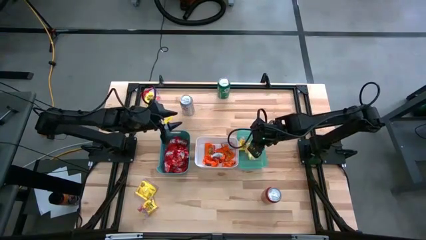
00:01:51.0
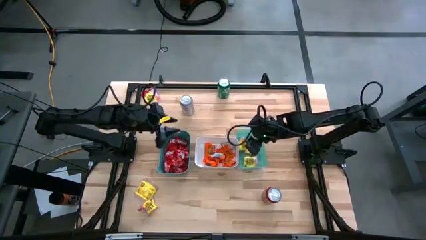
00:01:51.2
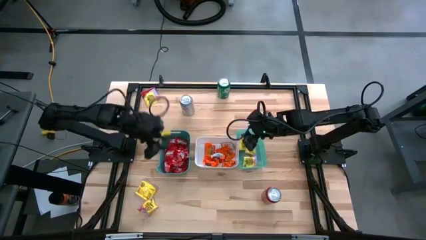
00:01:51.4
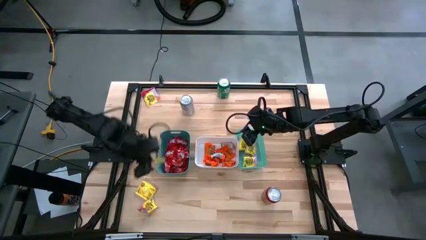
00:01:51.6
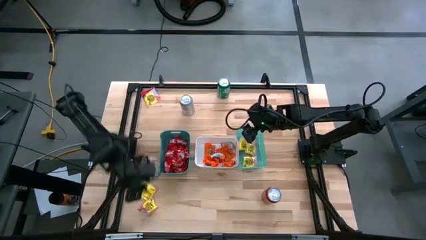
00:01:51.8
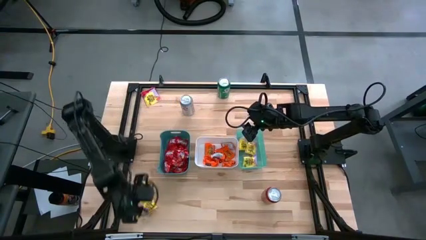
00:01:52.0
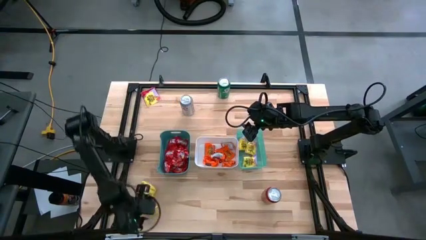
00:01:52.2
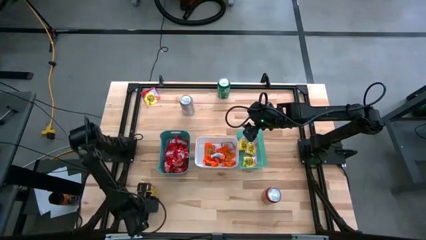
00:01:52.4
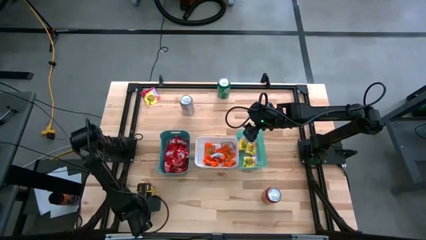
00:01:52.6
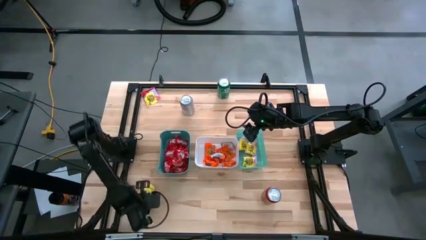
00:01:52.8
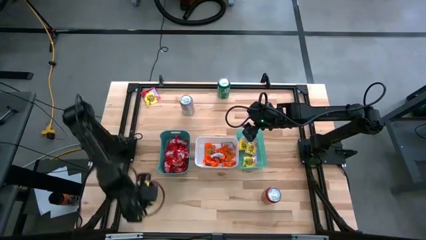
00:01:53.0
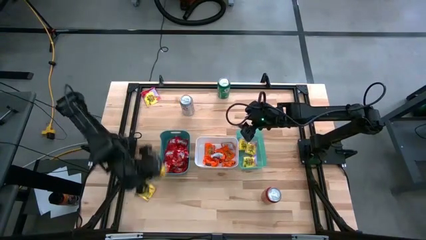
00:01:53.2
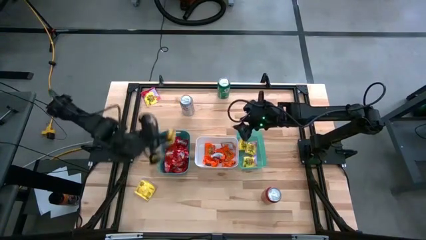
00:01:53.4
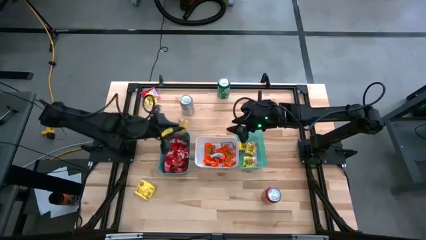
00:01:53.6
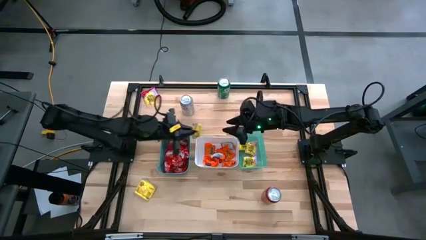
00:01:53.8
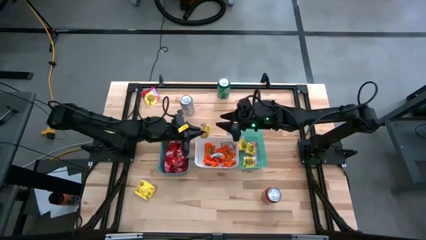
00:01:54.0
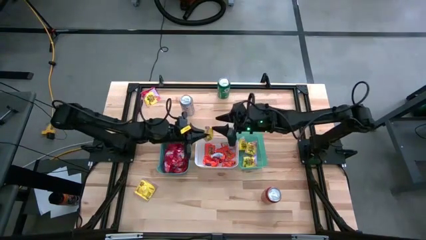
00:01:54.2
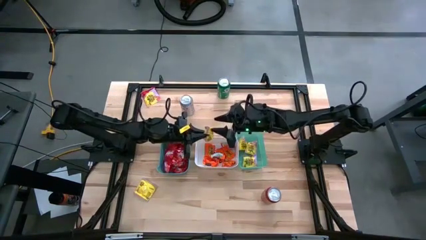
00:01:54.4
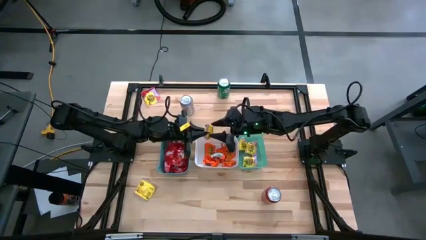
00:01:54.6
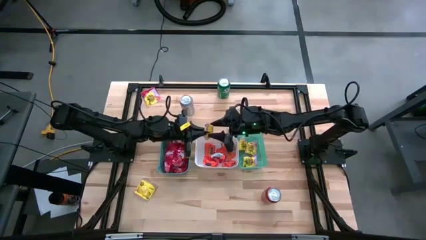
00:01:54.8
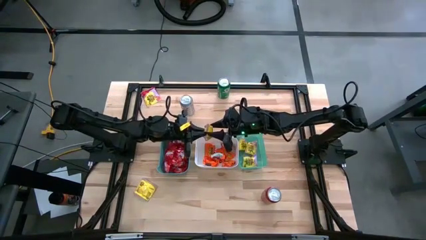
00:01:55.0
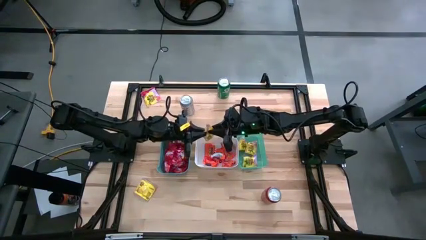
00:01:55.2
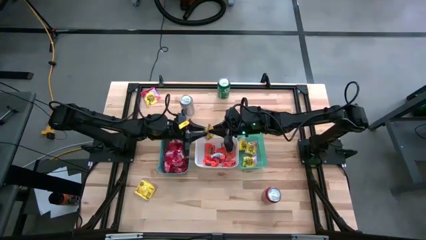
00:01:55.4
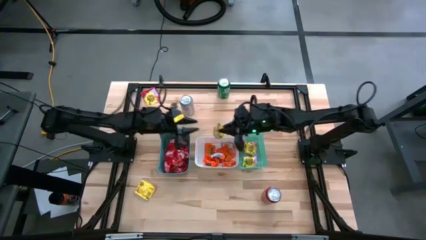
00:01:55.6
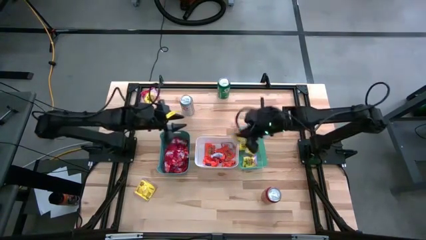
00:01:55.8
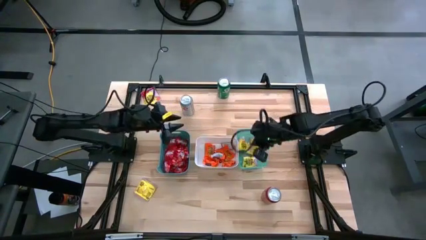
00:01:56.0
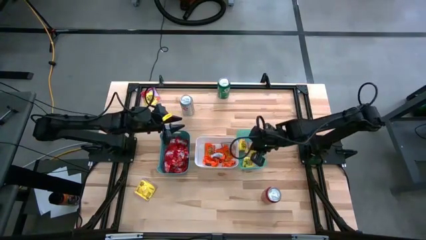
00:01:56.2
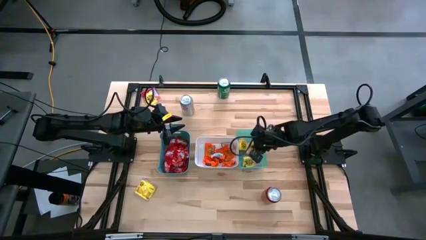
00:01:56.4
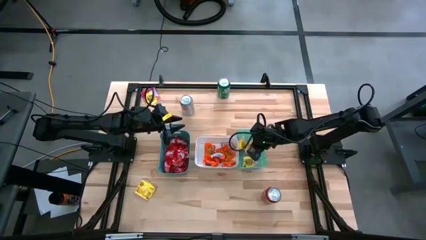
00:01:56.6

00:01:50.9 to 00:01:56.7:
Task: Sort candy
Put the yellow candy into the light green bin

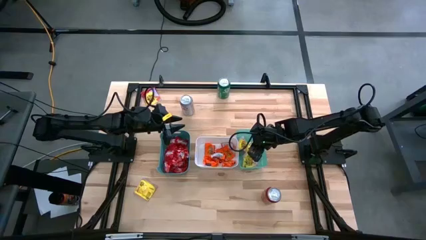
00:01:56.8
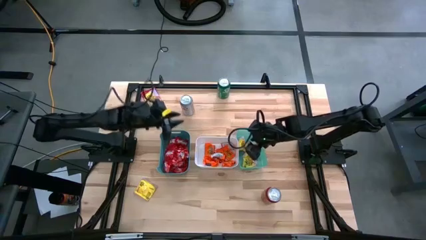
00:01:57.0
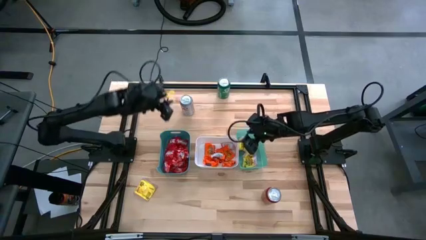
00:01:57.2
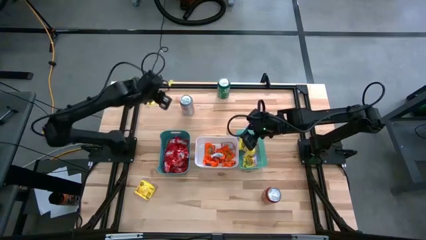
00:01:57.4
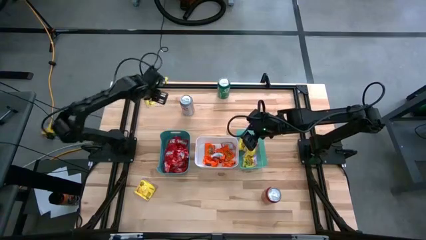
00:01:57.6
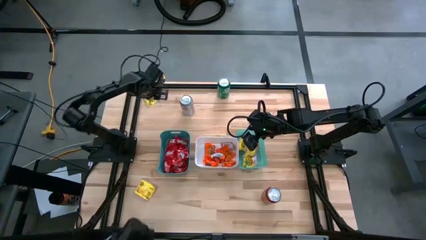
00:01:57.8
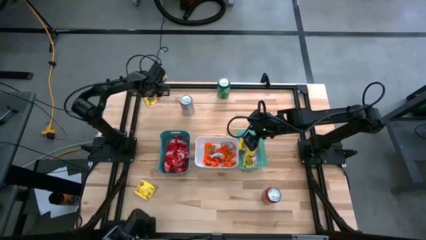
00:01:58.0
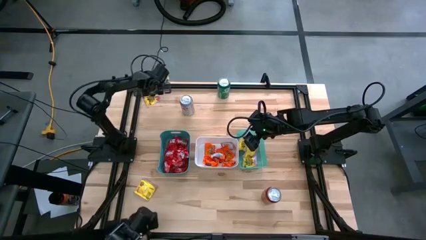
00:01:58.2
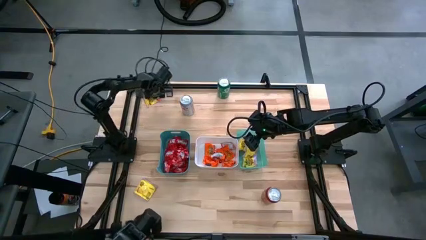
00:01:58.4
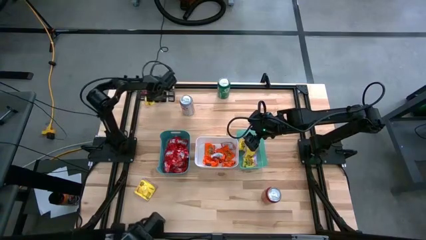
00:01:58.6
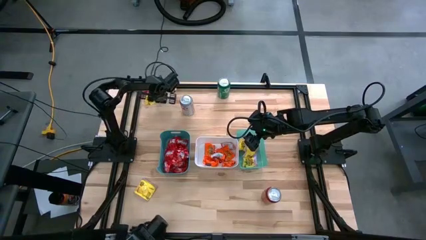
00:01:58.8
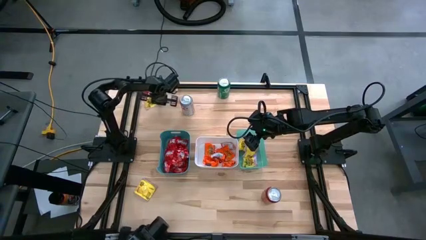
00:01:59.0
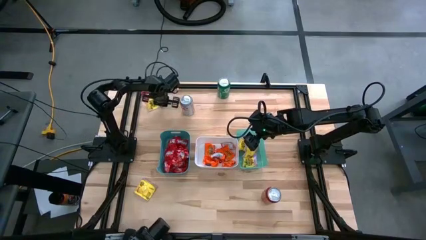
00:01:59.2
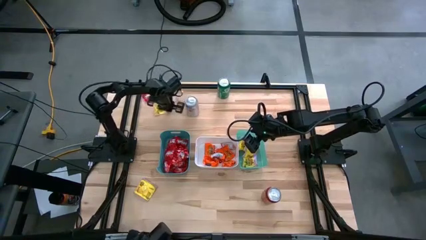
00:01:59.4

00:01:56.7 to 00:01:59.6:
Put the yellow candy into the light green bin

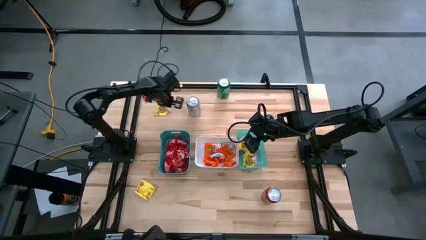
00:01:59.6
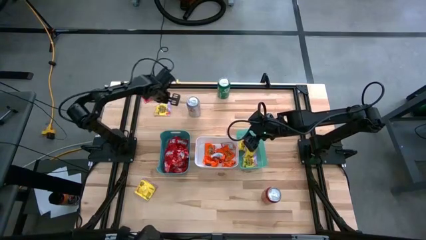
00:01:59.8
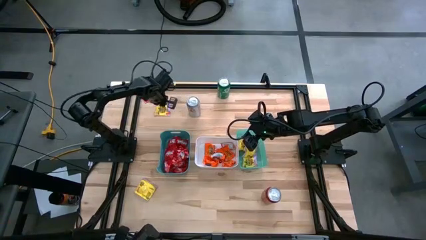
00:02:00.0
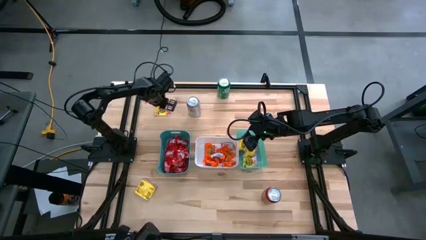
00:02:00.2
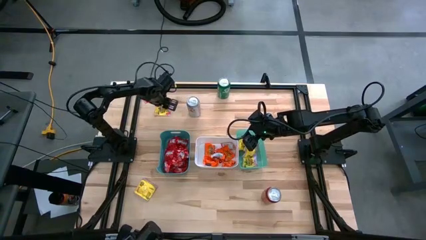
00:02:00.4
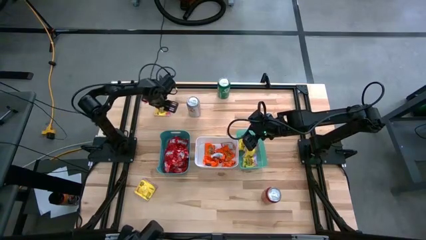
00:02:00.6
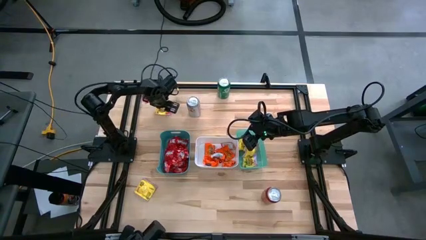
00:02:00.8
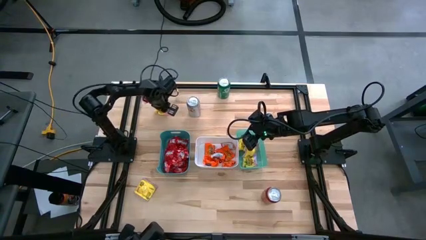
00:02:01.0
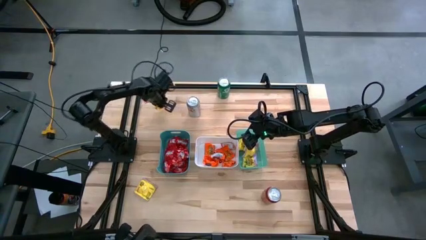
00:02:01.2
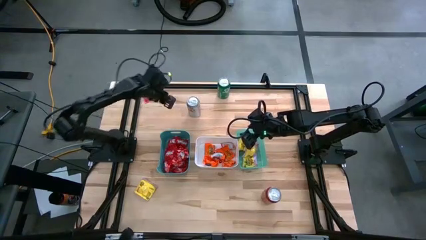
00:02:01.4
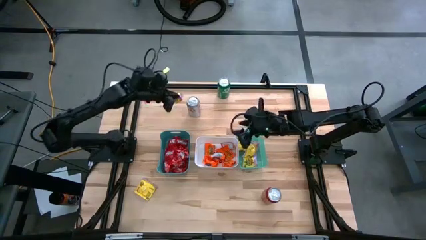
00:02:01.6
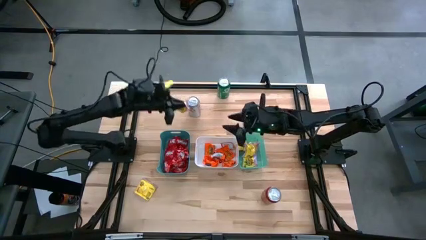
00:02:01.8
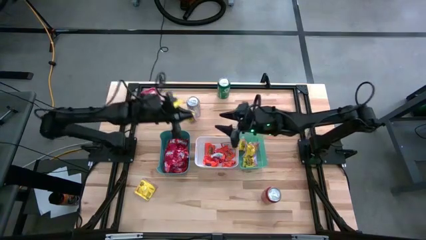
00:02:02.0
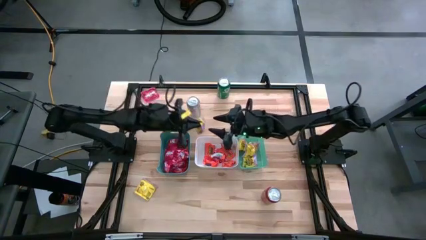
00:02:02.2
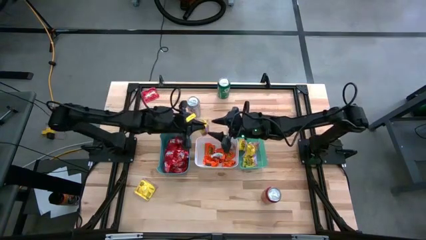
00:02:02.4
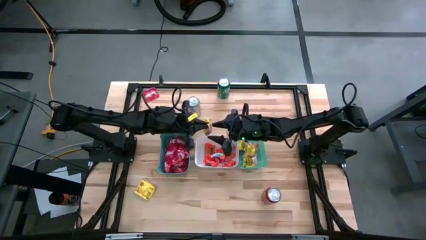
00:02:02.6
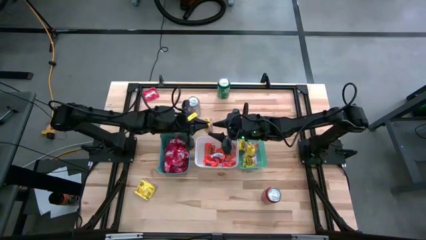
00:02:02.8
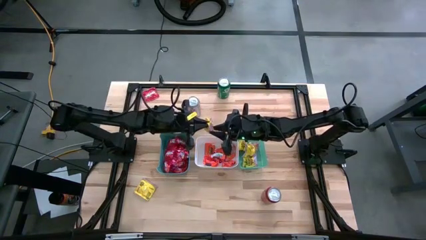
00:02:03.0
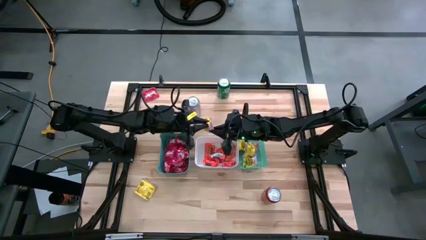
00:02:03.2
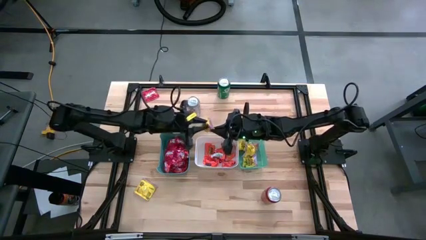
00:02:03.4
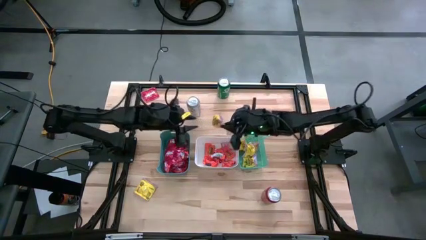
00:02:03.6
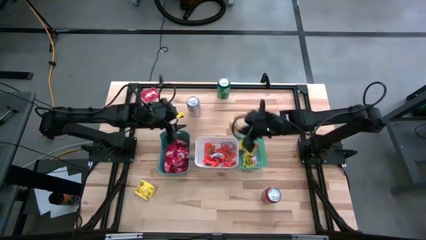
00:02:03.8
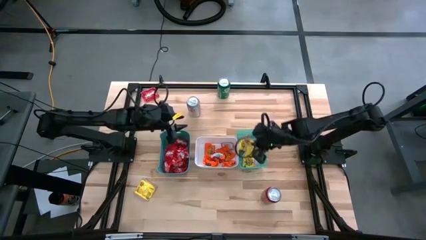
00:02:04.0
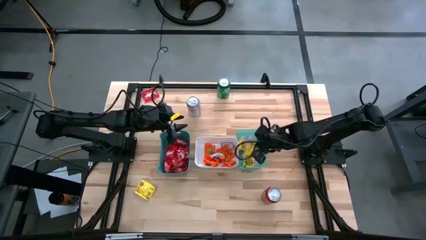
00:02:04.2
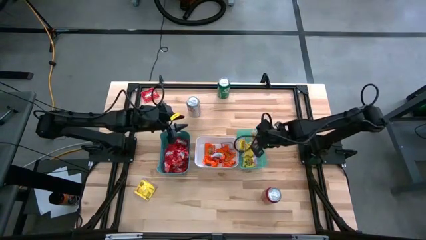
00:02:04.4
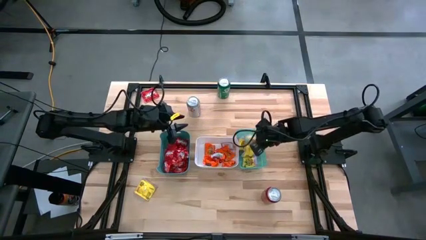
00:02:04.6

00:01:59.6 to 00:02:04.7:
Put the yellow candy into the light green bin

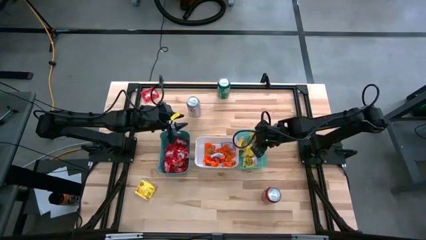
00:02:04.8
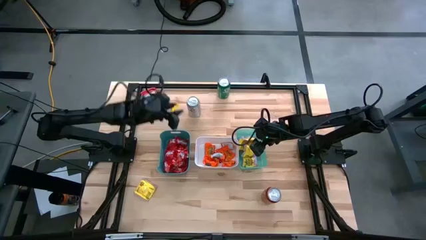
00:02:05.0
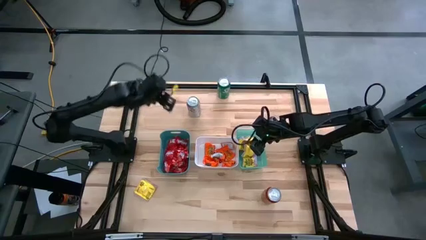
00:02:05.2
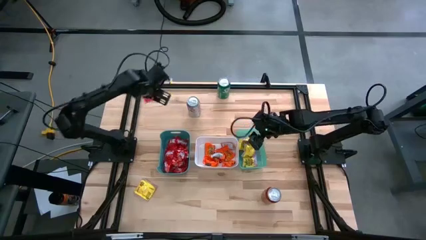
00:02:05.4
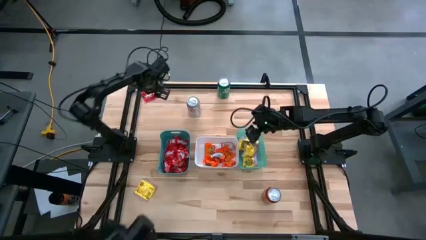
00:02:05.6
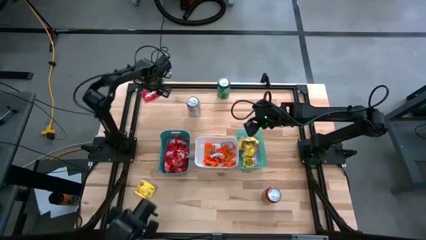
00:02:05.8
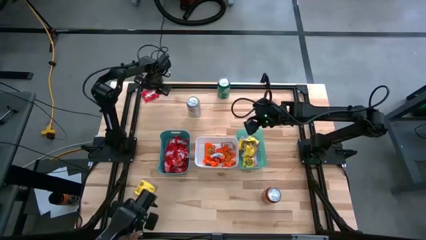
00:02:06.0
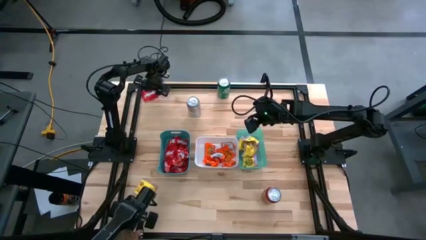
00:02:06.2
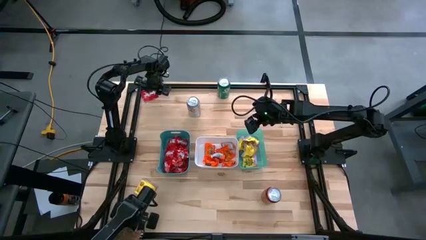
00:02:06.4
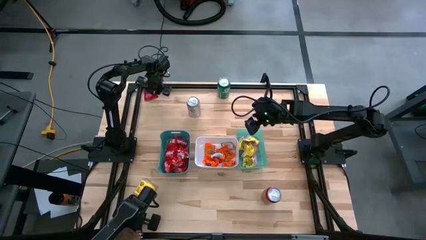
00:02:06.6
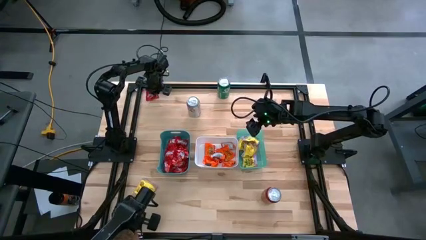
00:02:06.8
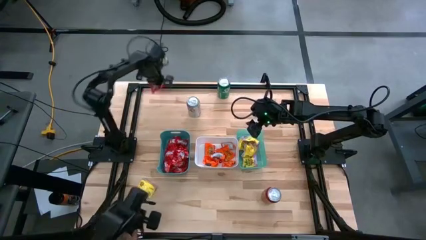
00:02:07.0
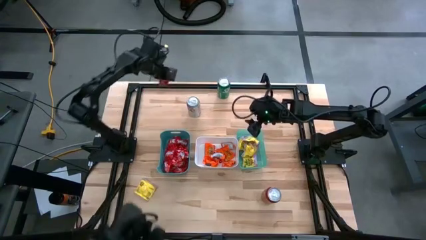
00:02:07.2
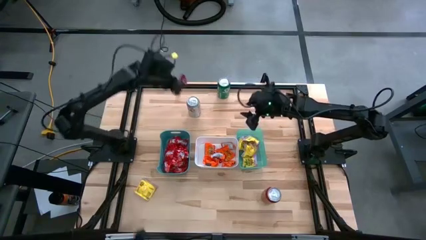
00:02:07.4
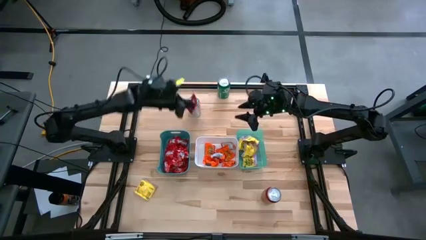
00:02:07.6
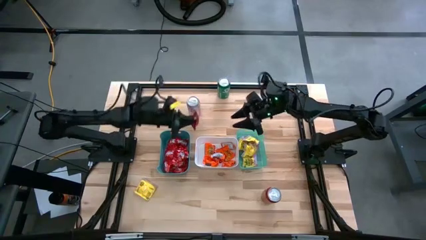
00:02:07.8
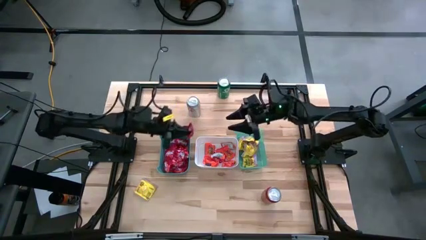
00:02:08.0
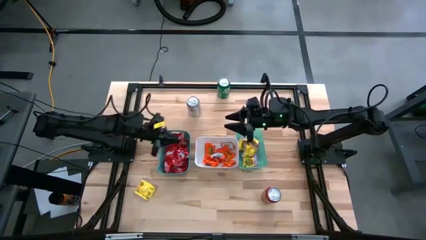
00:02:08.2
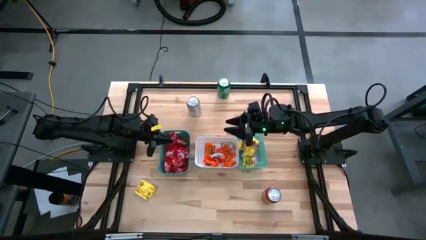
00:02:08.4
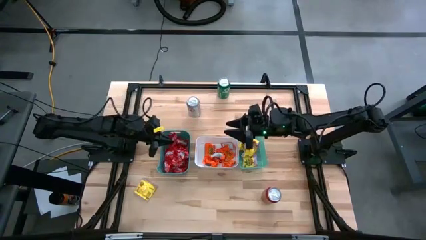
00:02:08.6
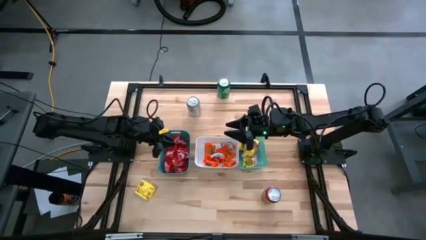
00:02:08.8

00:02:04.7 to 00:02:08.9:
Put the red candy into the green bin
